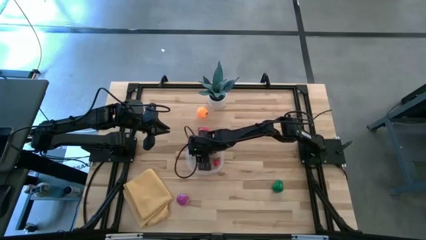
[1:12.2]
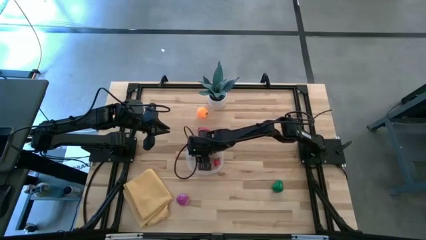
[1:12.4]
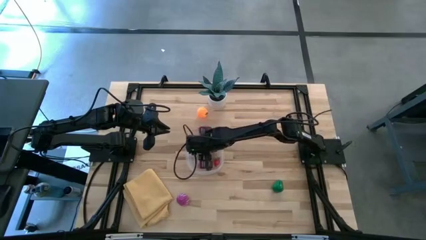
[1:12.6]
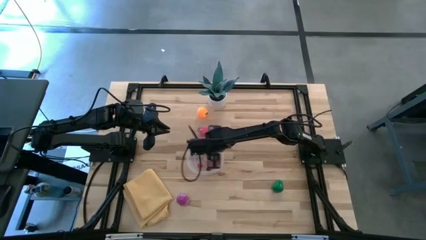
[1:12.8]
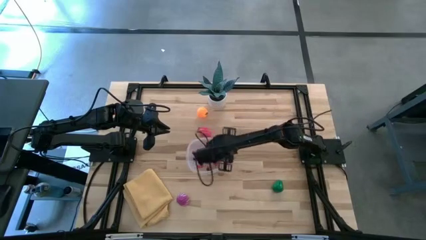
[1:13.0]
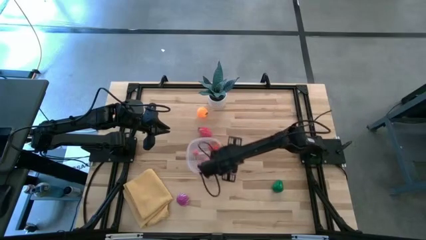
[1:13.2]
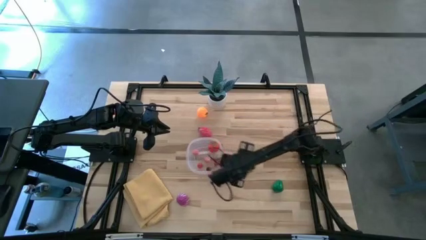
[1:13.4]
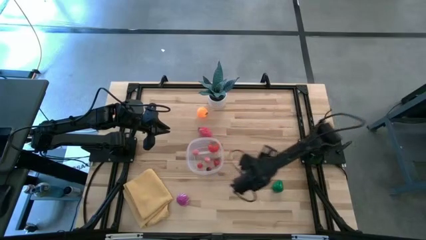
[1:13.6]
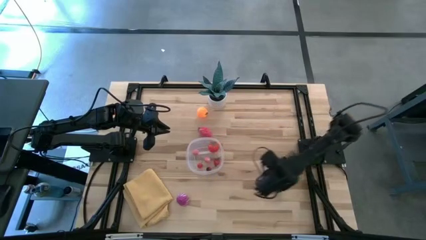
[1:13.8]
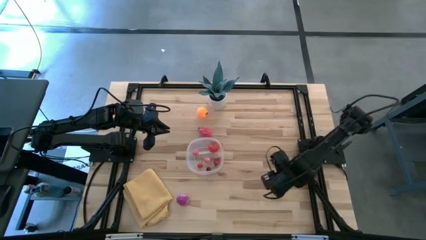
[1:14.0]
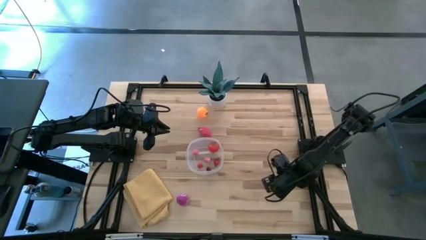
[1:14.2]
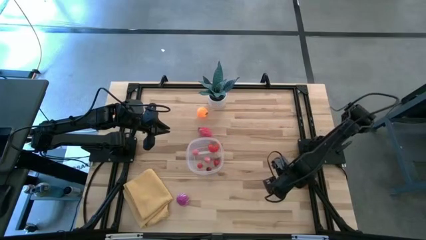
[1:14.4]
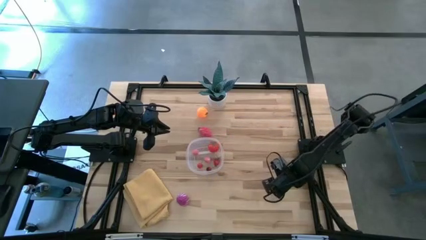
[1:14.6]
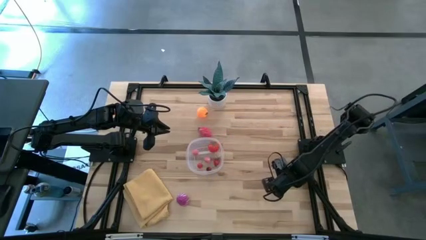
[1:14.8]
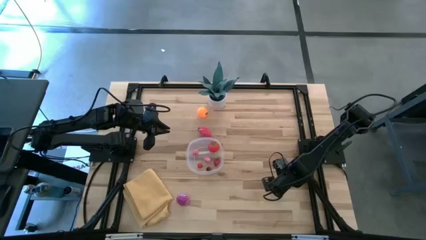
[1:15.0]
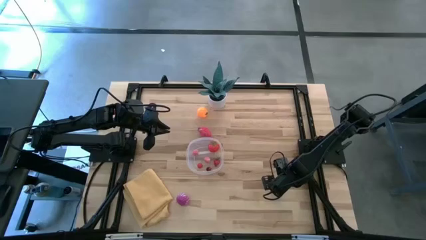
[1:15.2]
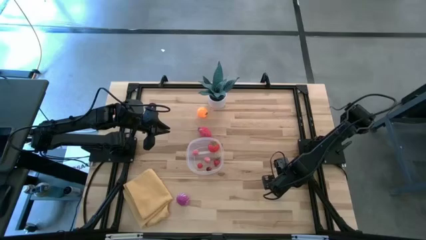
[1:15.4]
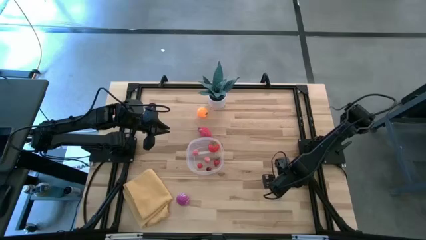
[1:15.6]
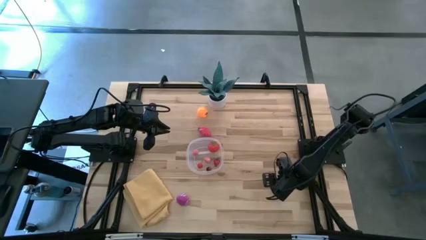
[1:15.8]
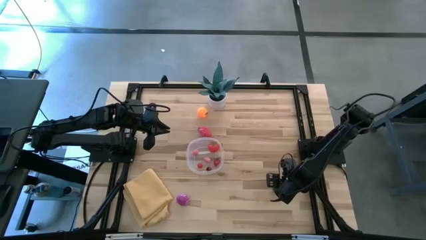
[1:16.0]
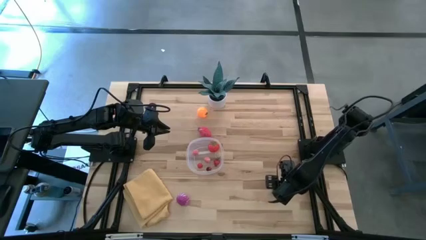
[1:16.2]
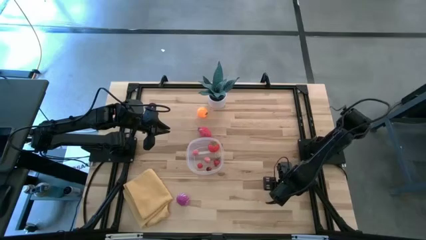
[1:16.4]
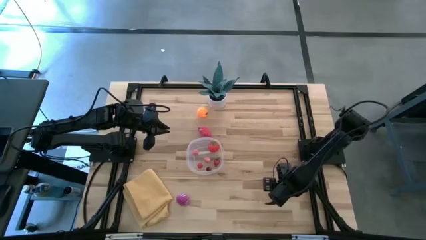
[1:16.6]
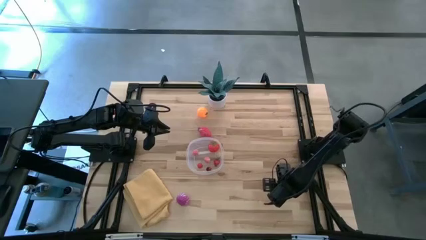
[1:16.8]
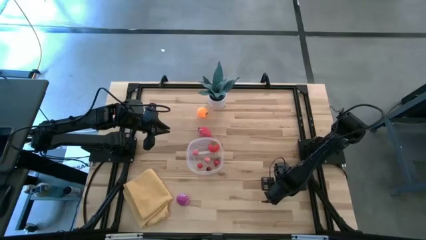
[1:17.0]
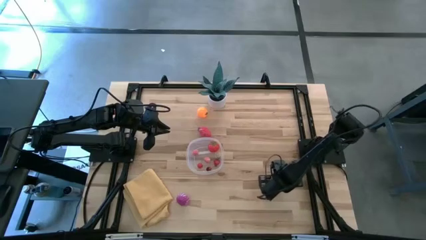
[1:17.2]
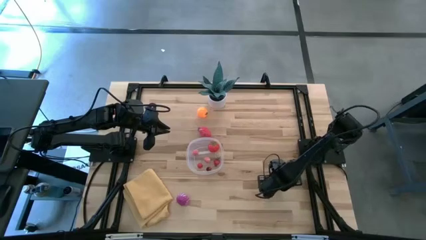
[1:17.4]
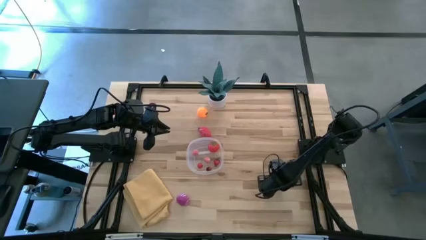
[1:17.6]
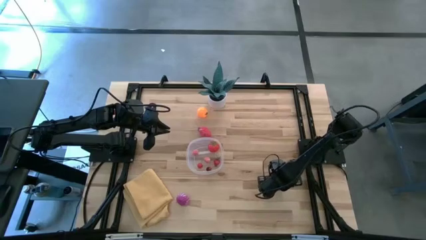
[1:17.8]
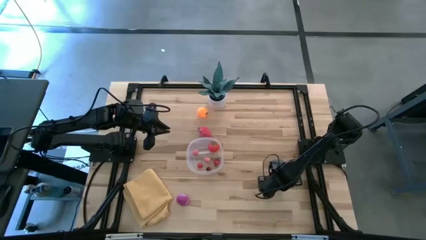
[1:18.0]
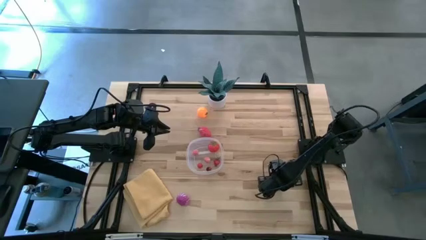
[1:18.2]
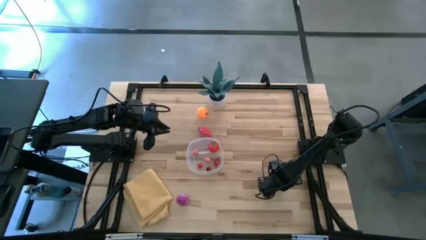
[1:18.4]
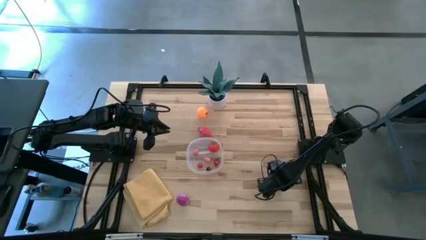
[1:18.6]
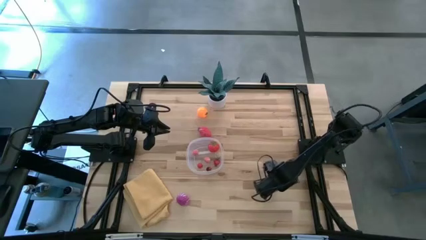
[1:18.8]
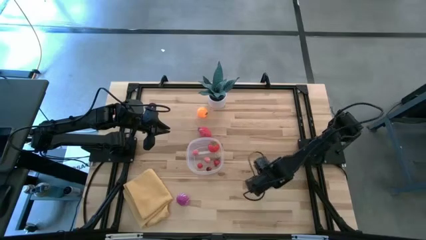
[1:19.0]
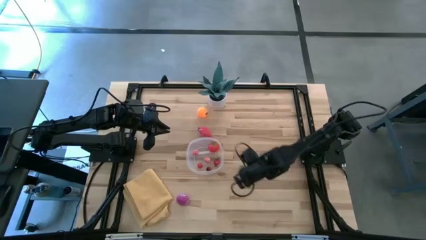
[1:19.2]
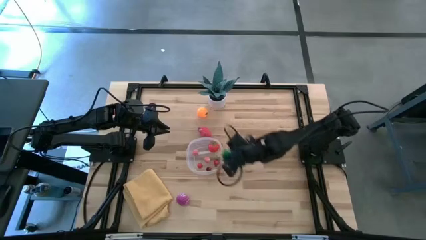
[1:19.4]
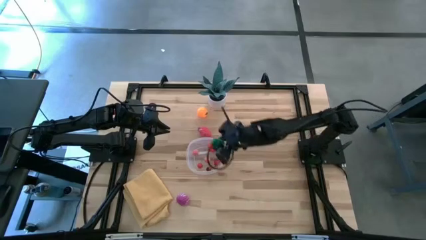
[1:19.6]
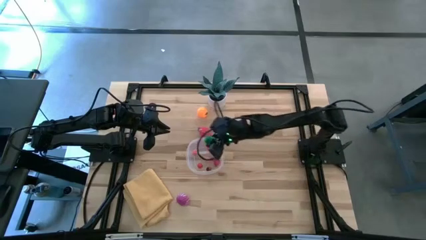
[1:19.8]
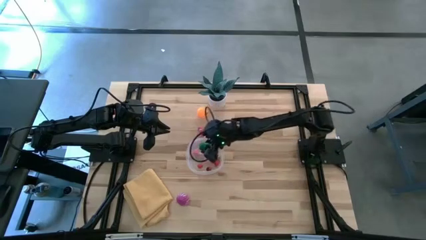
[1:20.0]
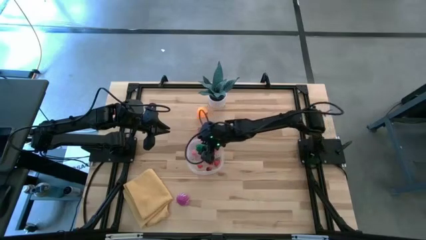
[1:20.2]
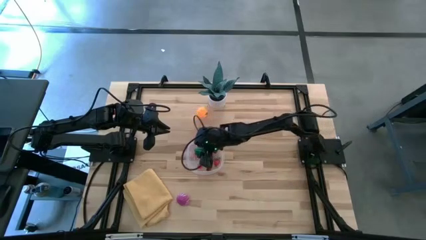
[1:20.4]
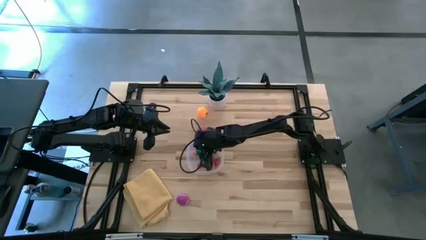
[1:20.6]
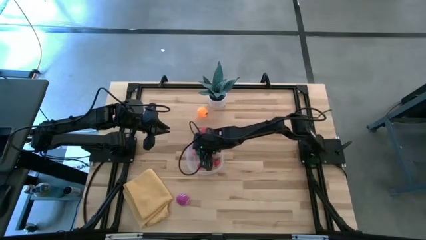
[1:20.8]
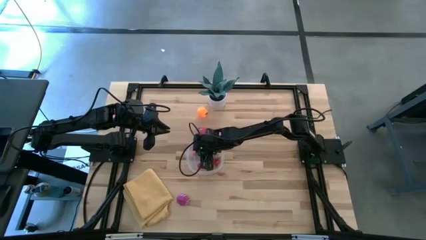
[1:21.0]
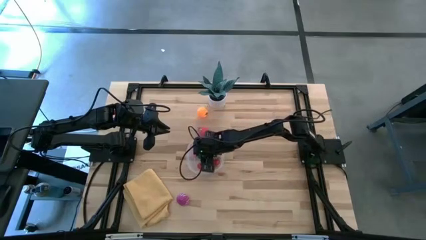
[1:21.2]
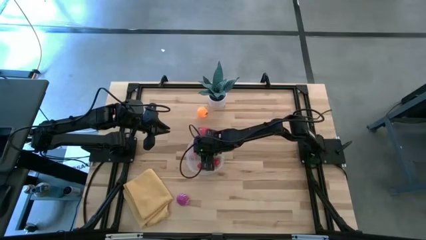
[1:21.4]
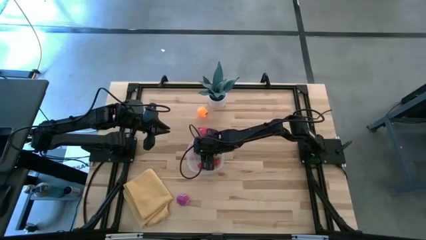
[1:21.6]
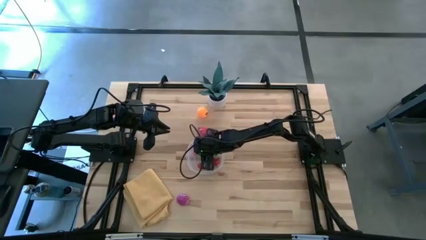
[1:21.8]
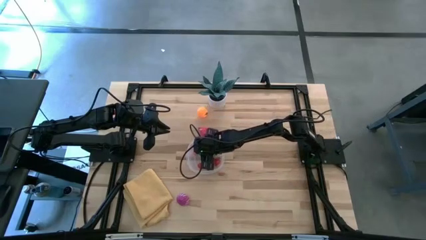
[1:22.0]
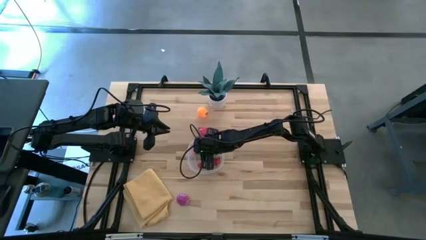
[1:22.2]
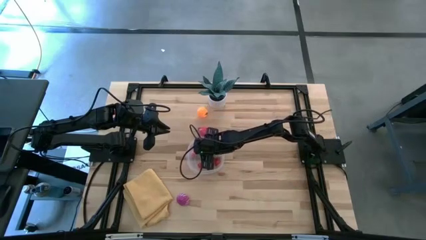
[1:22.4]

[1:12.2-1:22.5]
Task: Pick and placing Produce into tupperware
Put the green bell pepper into the transparent bin

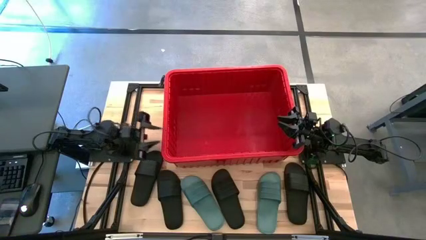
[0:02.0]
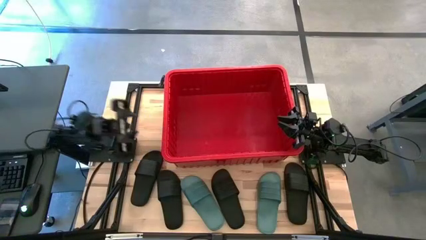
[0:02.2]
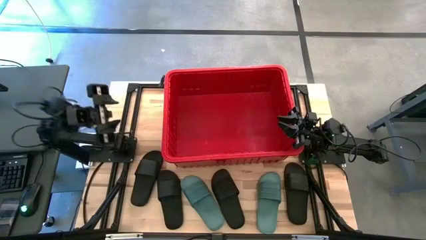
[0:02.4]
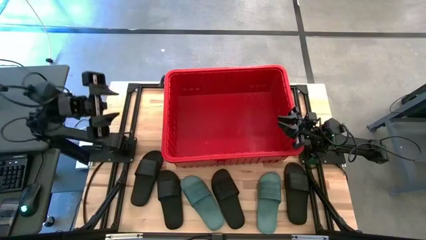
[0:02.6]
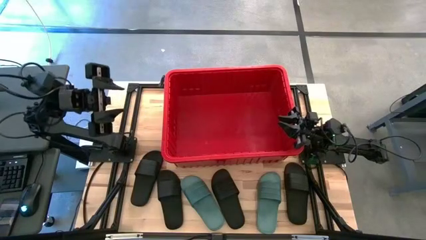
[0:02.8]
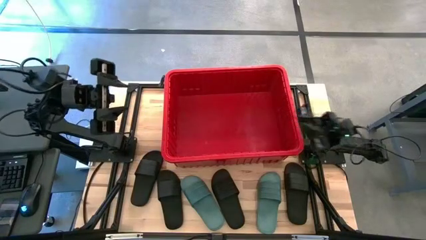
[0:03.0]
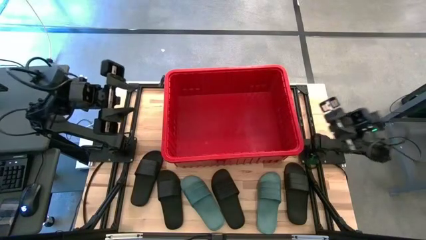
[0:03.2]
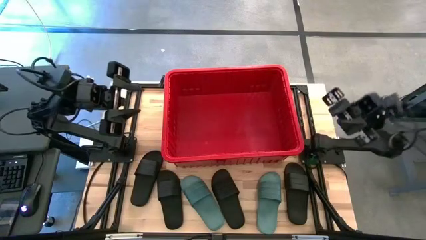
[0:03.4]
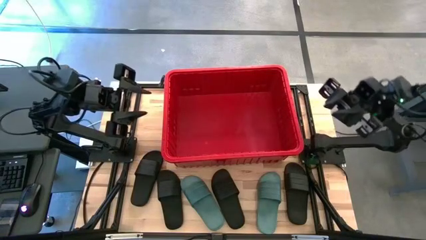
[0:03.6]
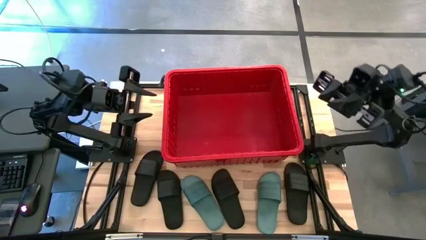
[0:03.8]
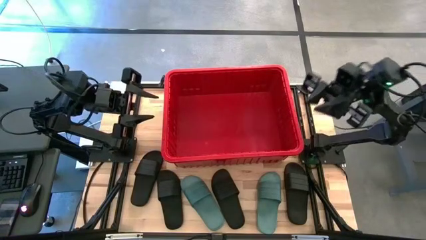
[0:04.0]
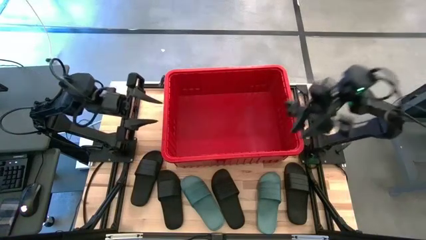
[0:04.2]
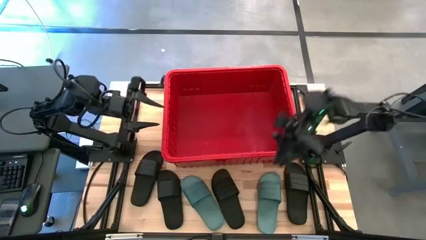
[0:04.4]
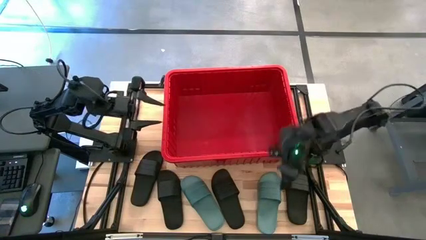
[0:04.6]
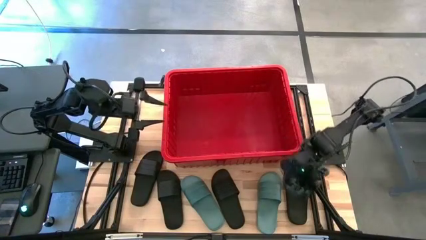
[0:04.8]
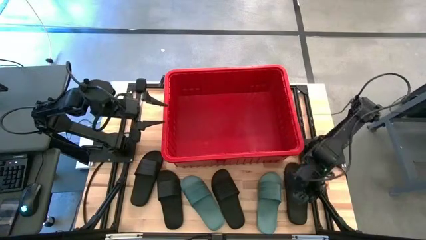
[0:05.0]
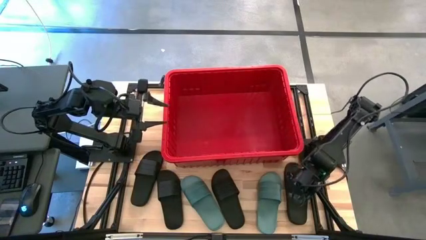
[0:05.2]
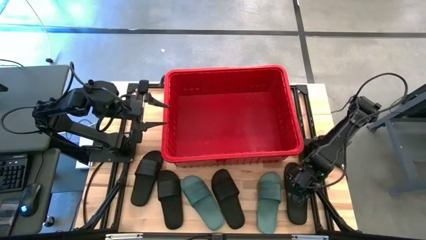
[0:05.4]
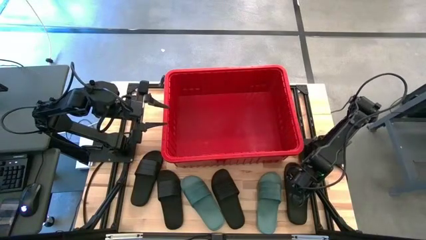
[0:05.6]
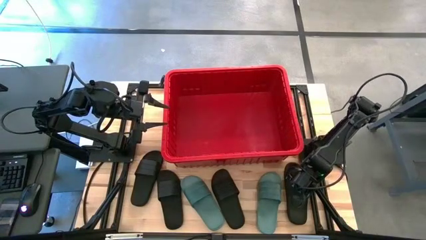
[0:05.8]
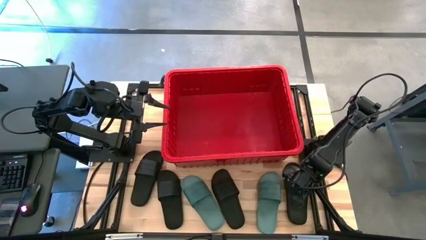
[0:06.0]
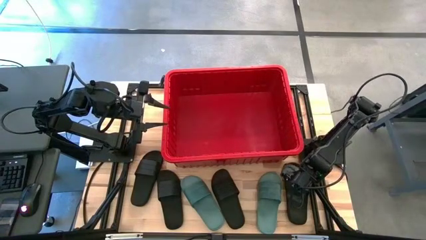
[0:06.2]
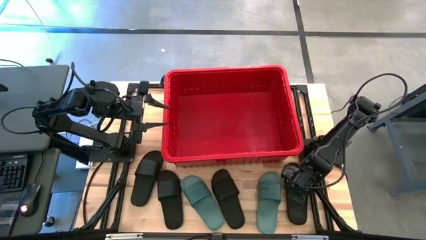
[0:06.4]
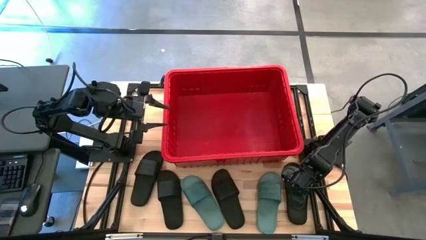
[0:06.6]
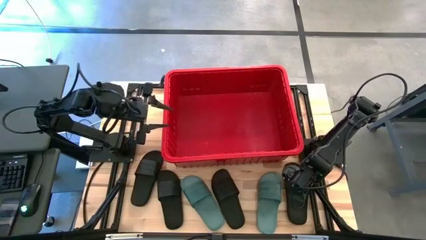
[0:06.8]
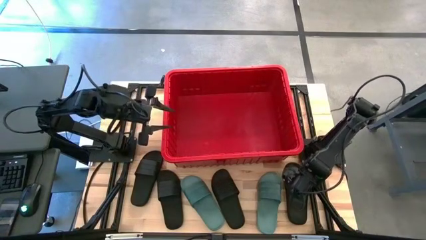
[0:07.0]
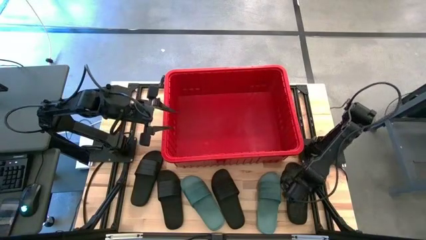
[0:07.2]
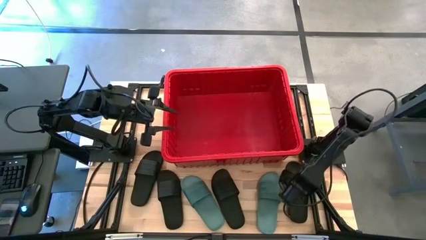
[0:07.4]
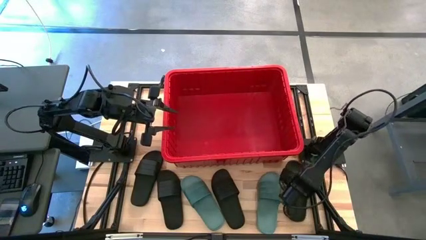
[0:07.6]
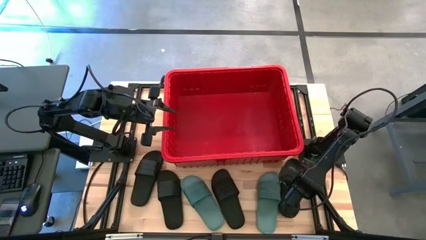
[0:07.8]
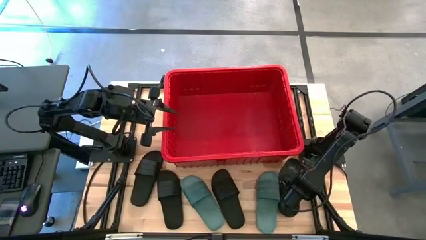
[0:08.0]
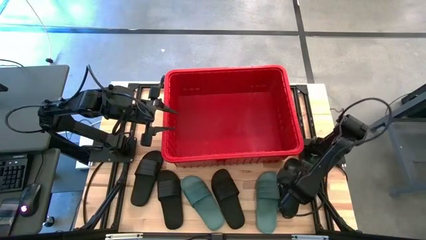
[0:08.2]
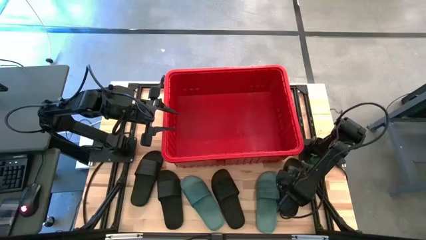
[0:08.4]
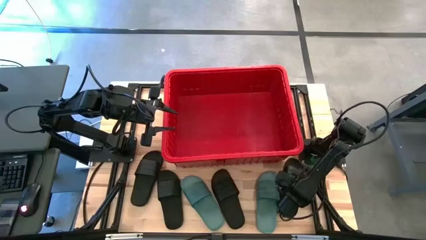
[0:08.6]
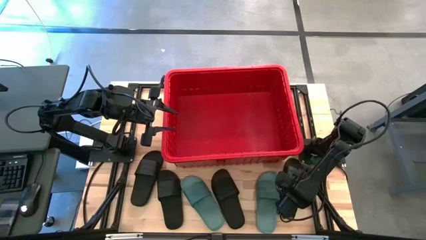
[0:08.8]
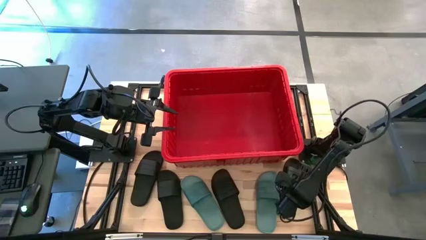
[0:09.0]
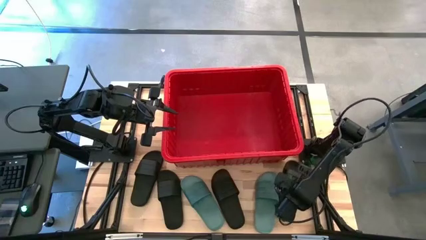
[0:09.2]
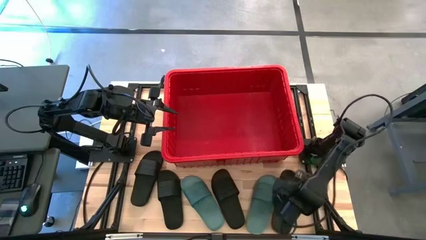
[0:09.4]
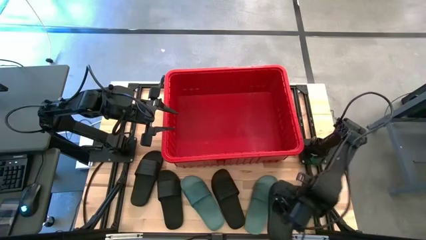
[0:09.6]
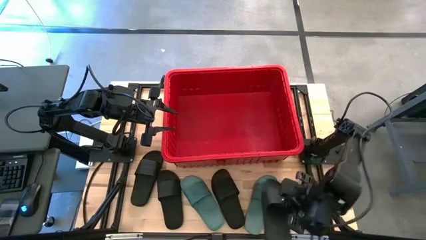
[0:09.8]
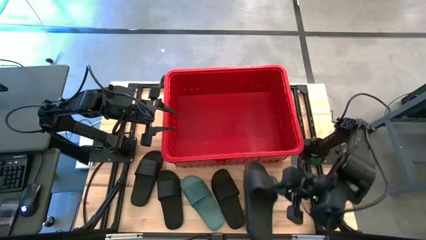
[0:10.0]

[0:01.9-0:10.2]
Task: Pick and place slides into bin
Put the black slide into the red bin
